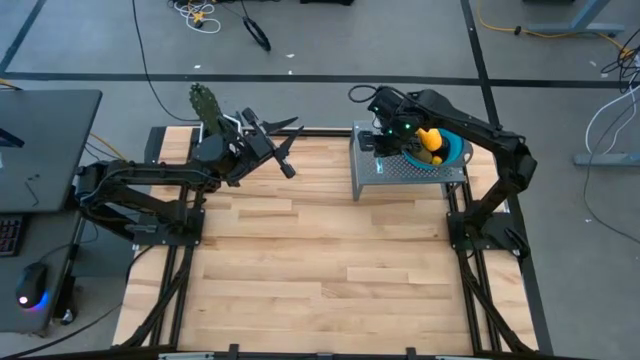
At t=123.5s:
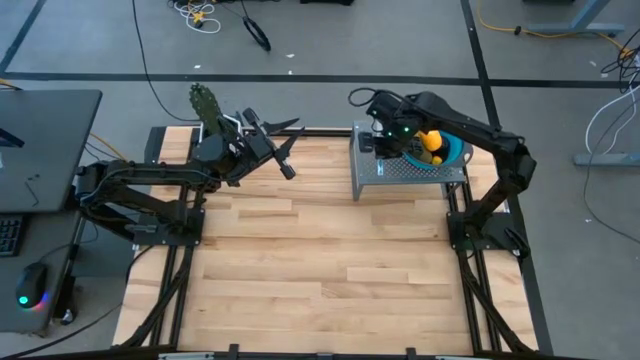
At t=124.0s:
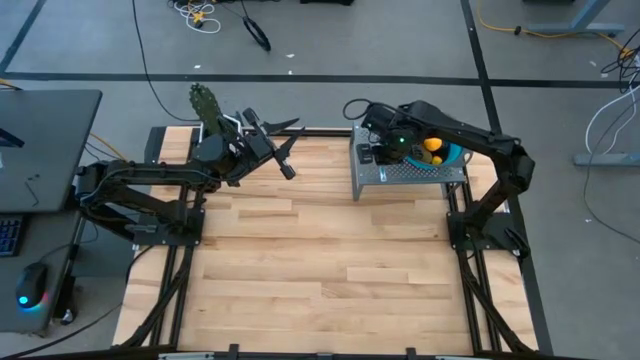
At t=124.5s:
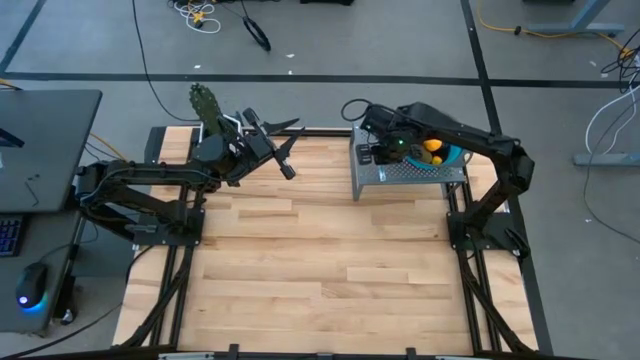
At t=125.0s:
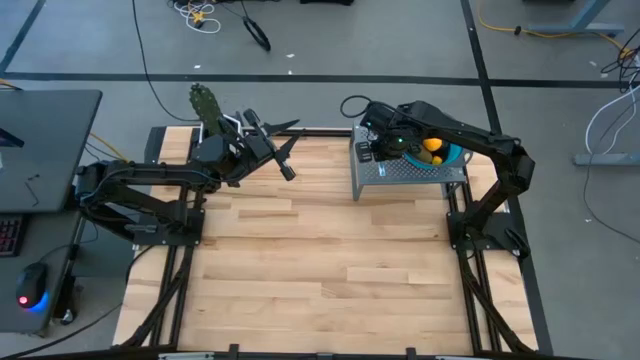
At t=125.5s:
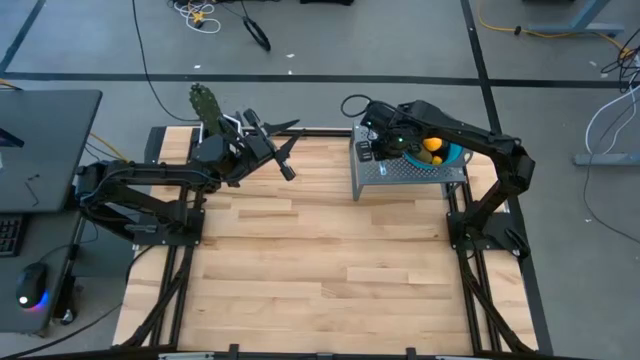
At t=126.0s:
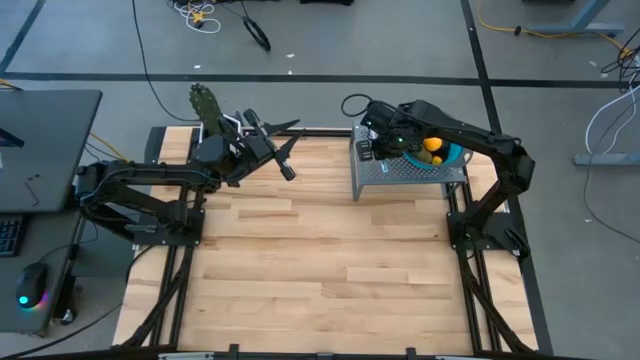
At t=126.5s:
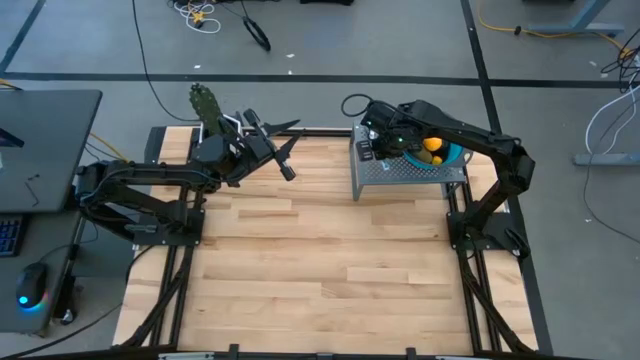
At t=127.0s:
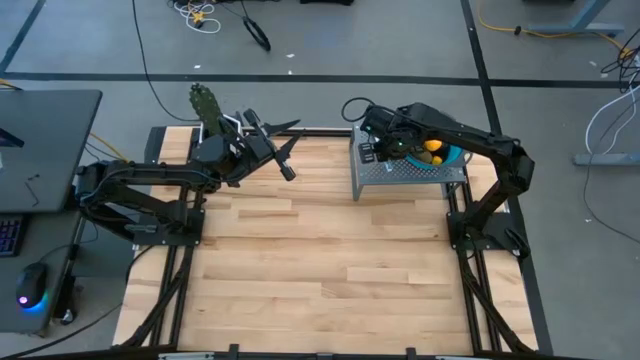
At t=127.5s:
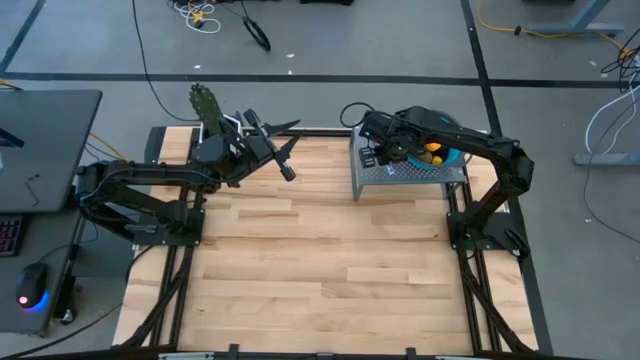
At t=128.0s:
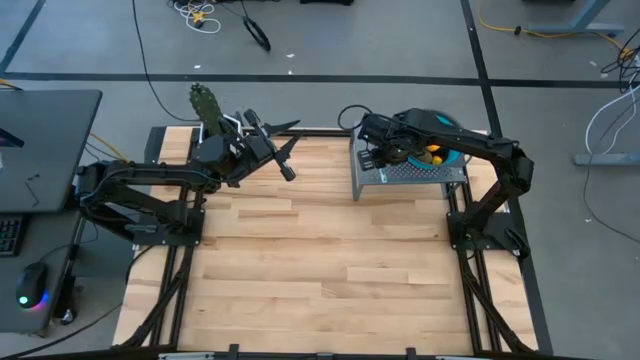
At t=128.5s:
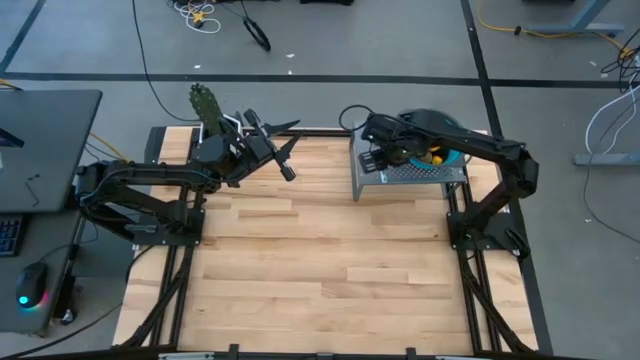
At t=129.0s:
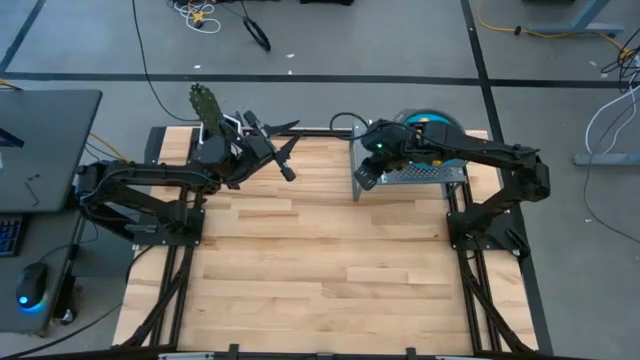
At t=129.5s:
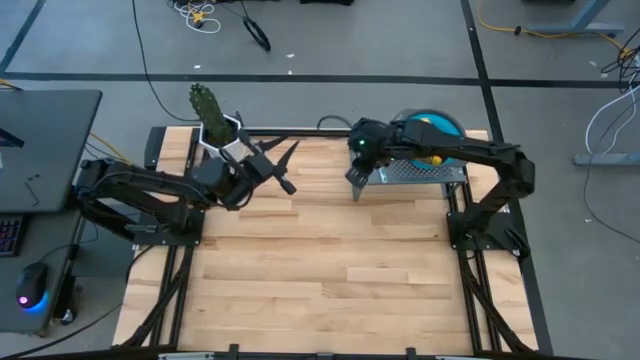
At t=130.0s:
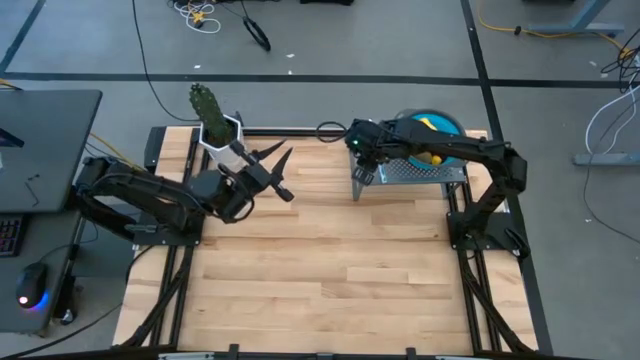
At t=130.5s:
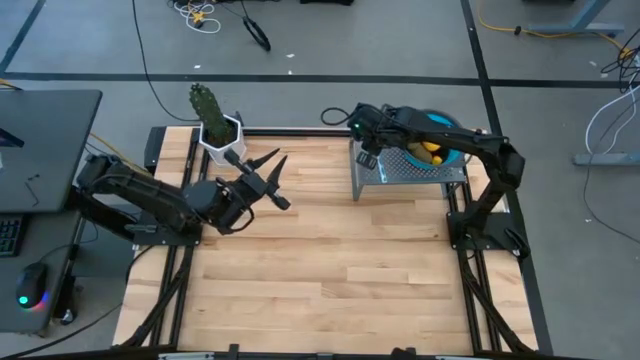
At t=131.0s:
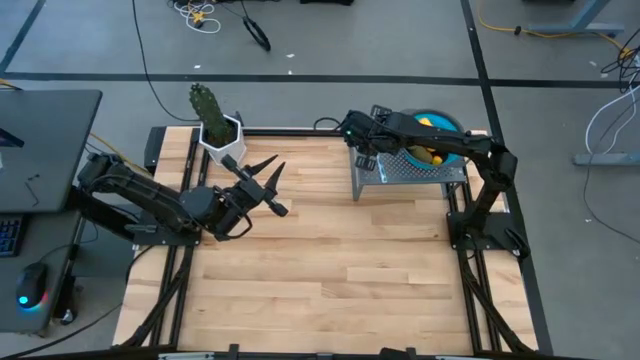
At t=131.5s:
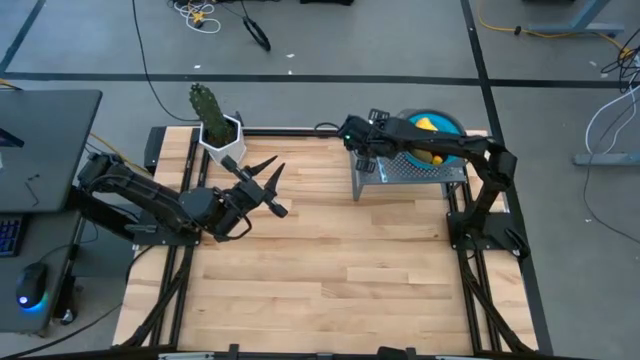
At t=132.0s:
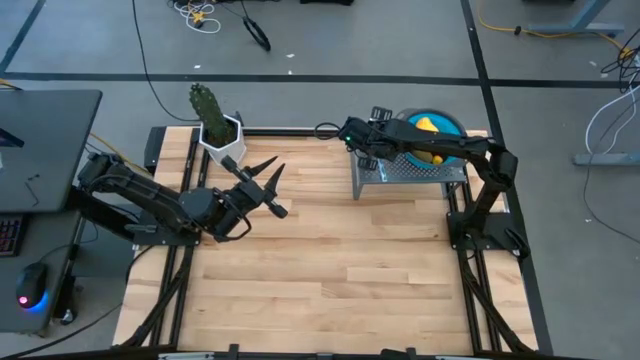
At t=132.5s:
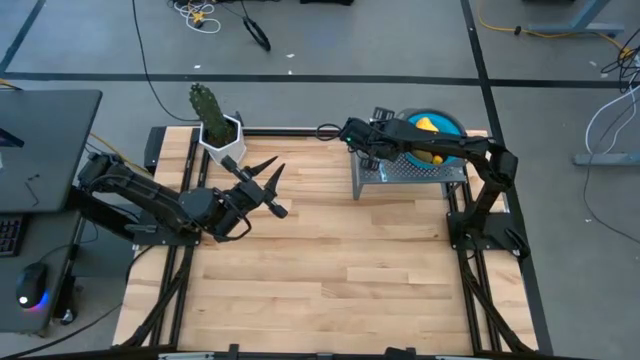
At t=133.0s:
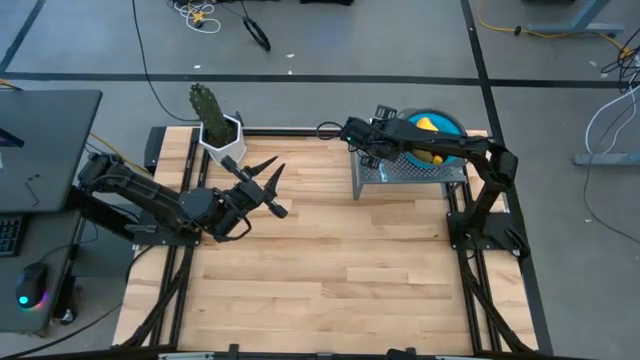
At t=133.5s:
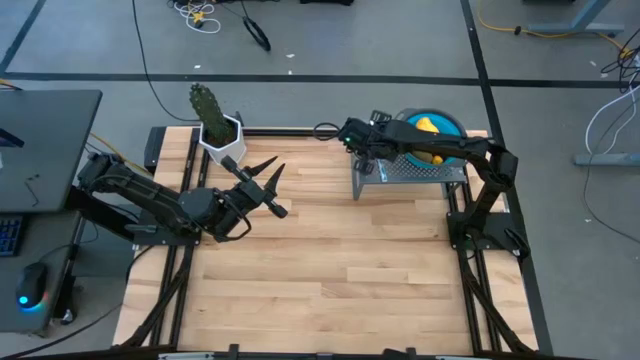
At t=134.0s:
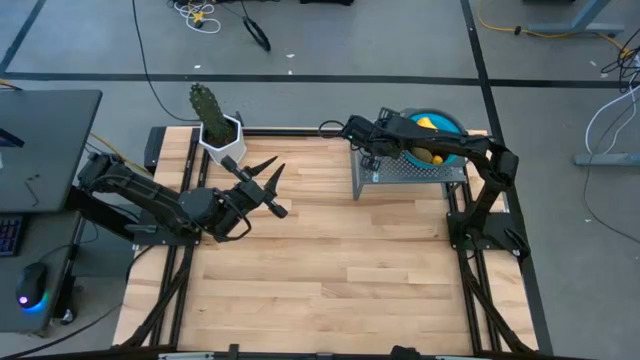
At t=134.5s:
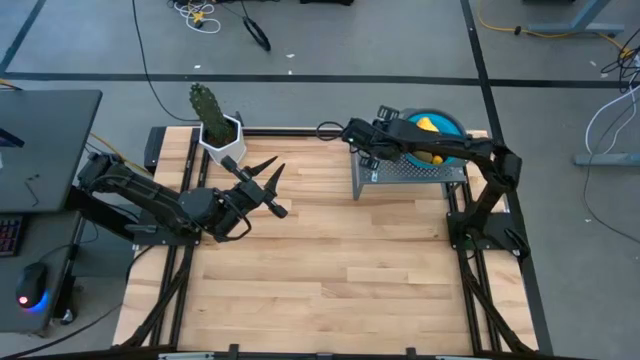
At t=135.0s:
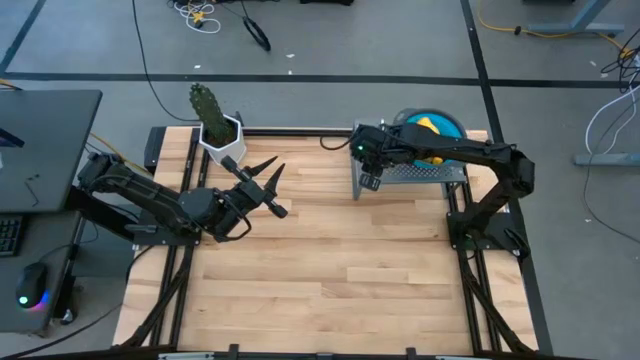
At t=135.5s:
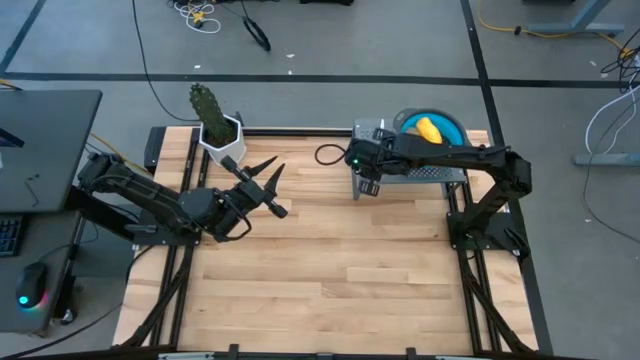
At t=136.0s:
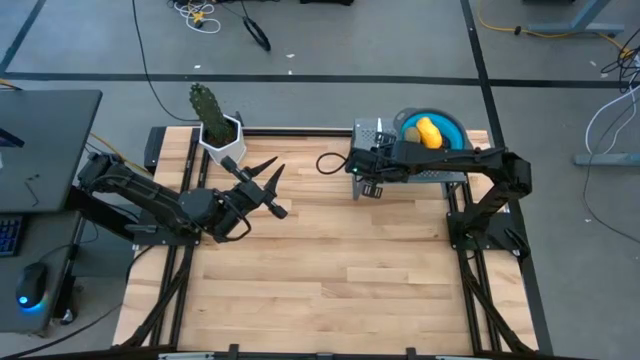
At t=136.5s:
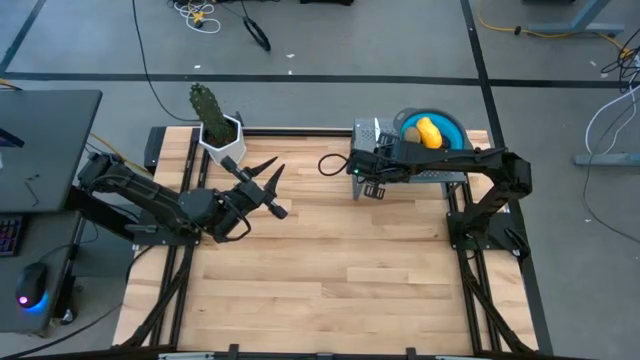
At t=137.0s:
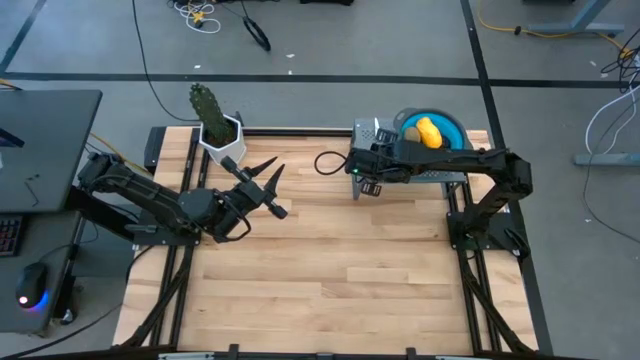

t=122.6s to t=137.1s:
Task: Pick & Place Fruit
Put the knife to the left of the blue strainer bowl on the shelf

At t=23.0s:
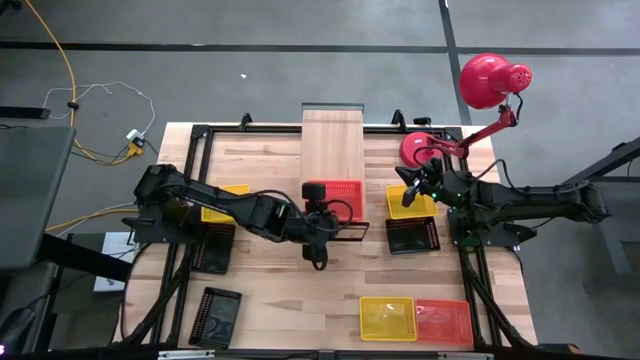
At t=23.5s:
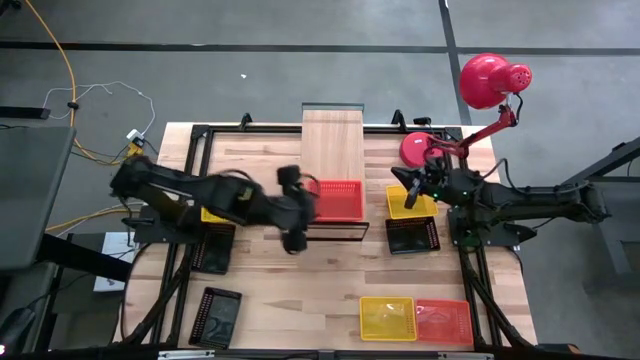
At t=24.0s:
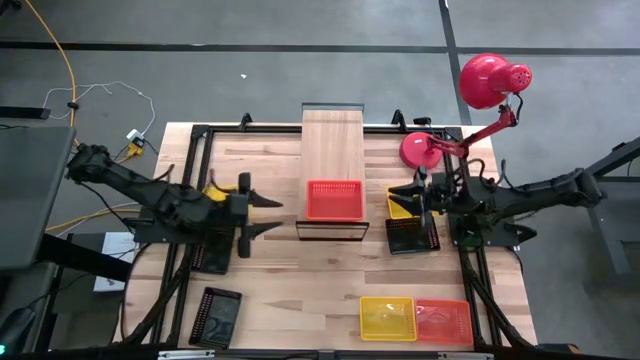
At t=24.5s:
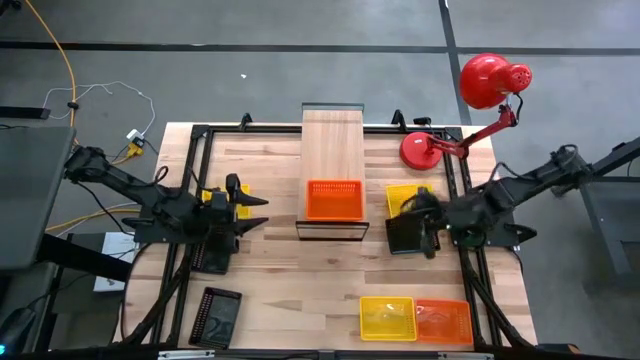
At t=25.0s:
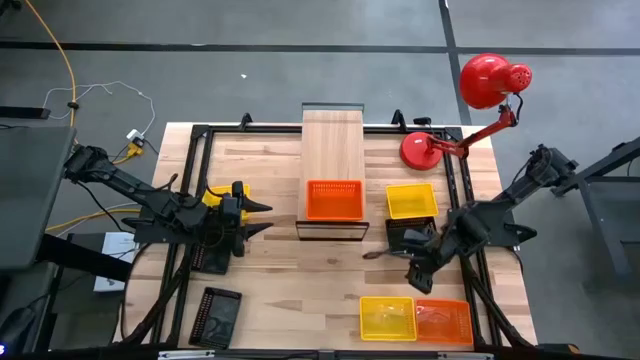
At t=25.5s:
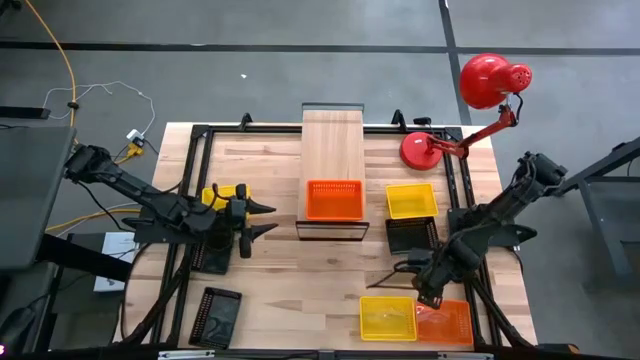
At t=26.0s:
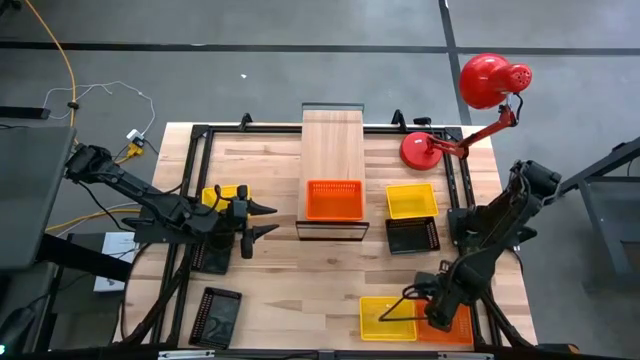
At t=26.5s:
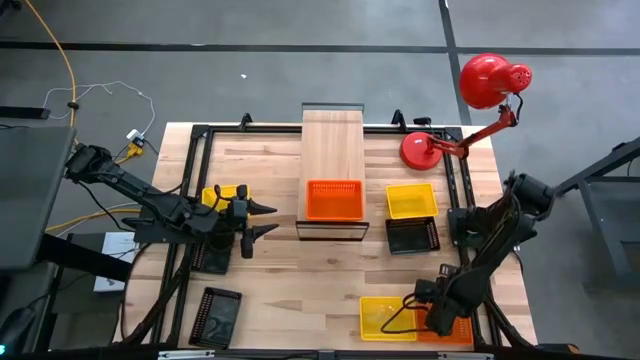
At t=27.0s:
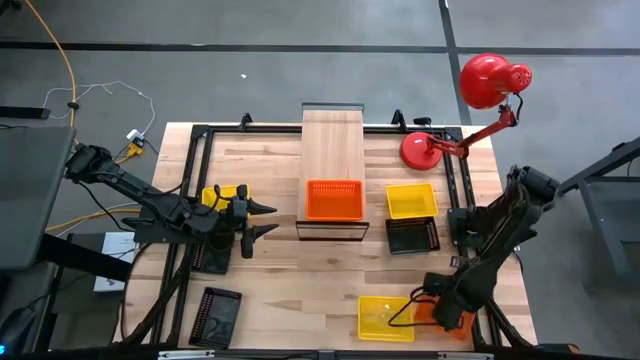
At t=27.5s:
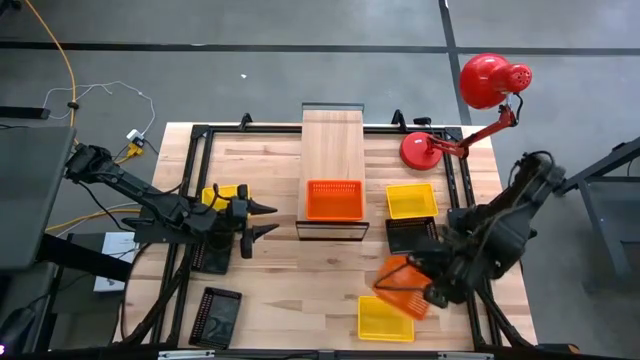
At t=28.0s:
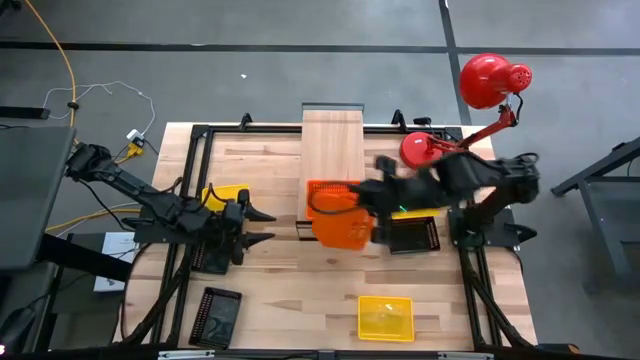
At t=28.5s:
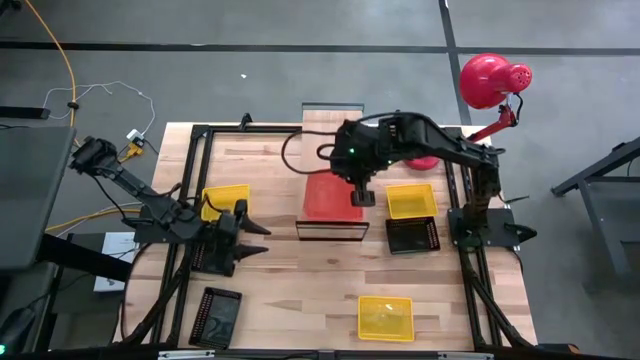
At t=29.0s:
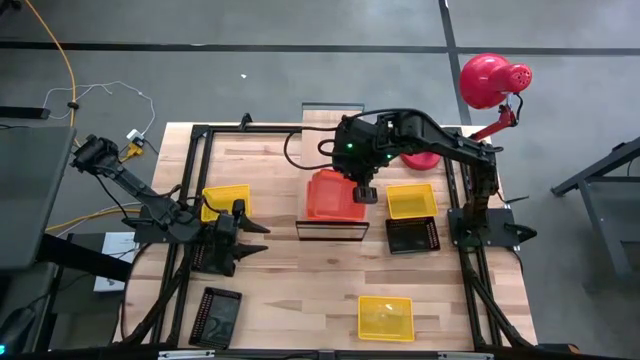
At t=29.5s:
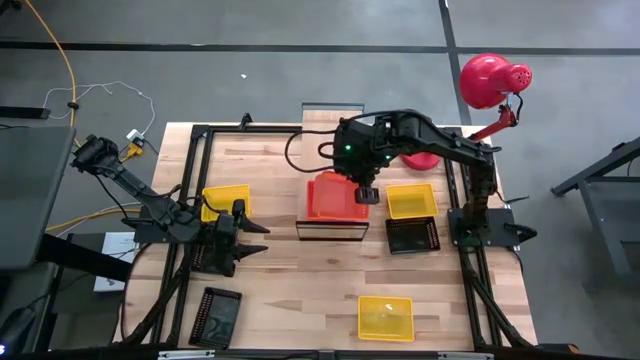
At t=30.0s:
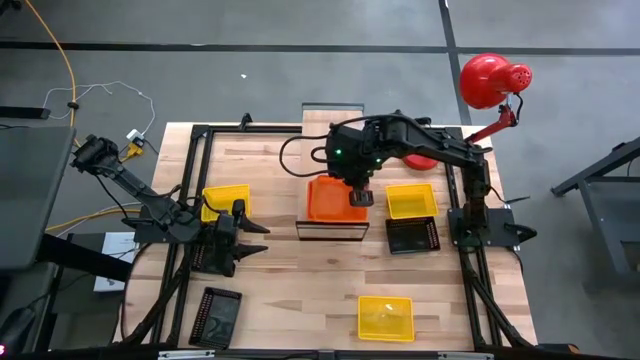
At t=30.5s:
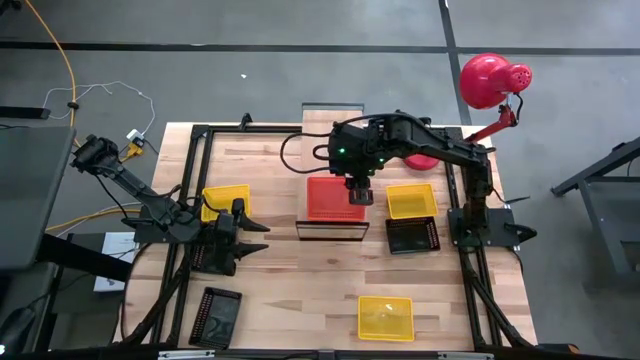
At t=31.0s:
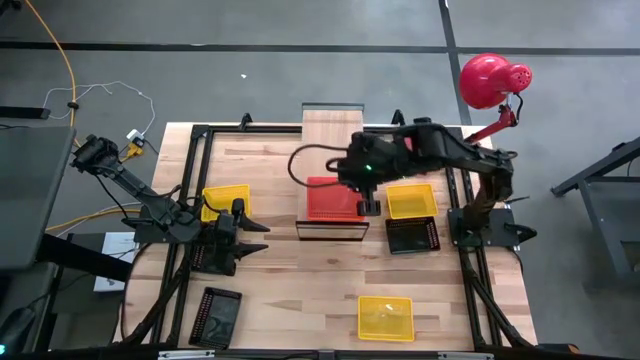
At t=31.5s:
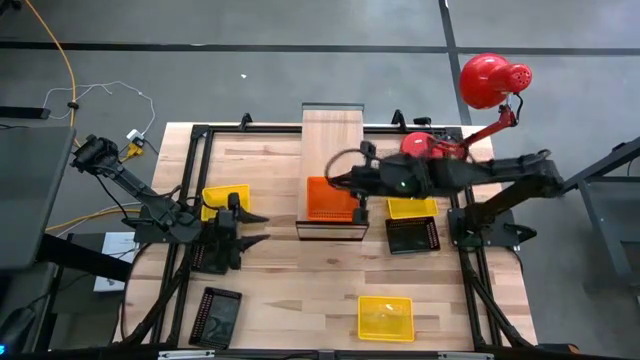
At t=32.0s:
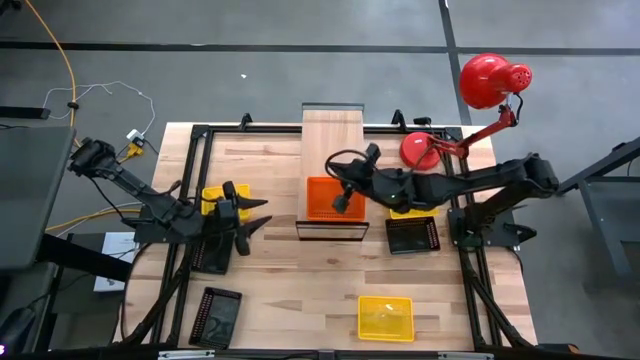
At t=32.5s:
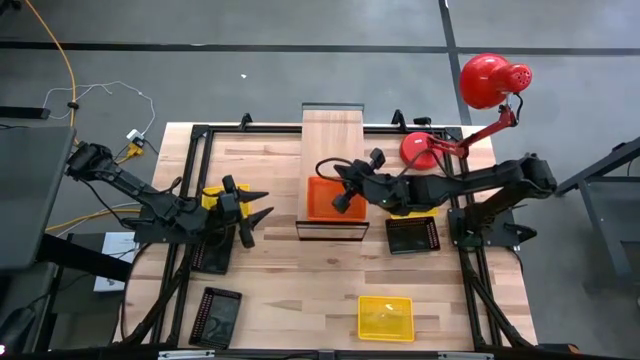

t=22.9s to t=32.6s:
Task: Stack baskets on shelf by color
Stack the orange bin on the orange bins on the shelf
